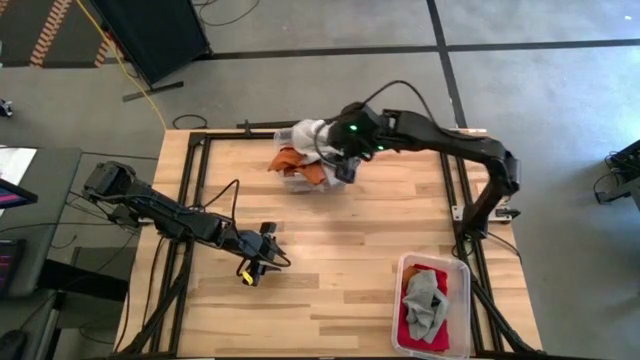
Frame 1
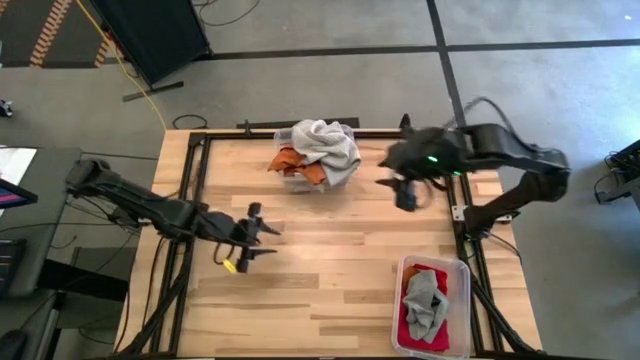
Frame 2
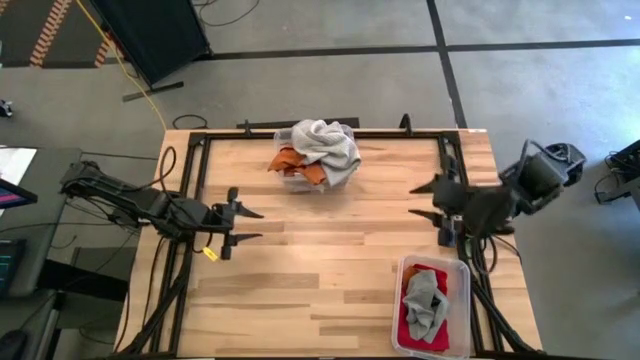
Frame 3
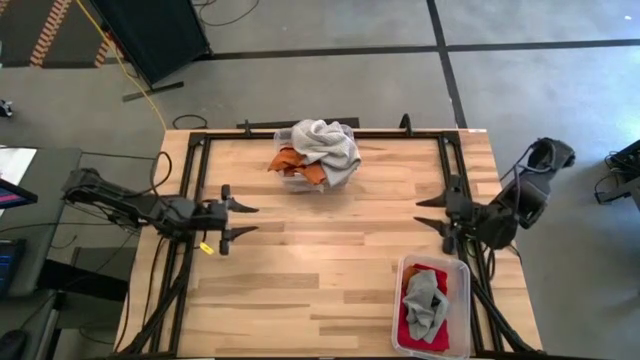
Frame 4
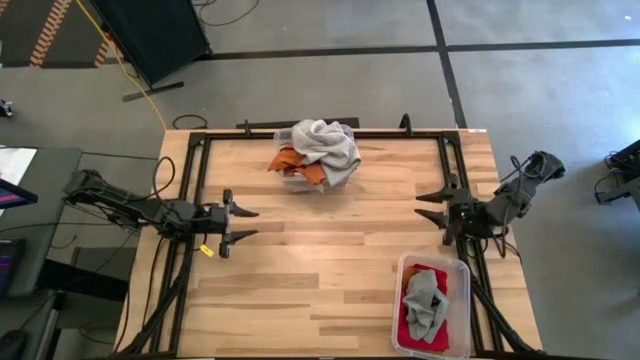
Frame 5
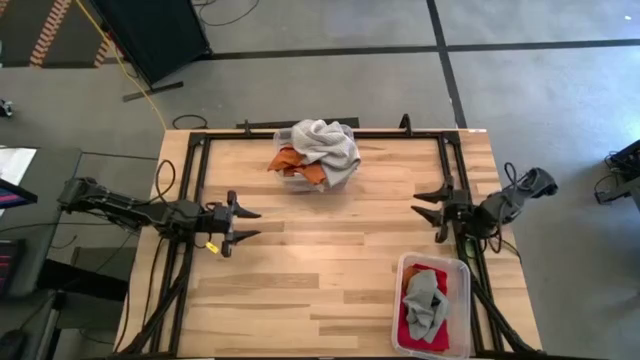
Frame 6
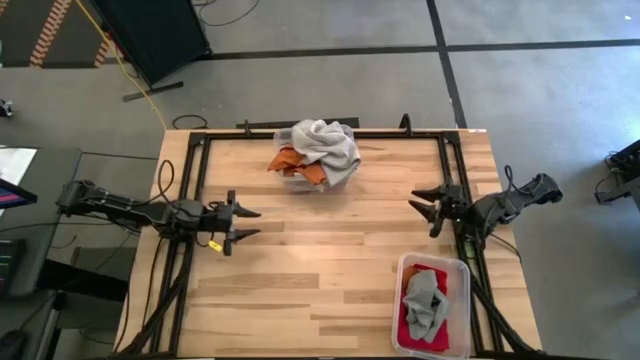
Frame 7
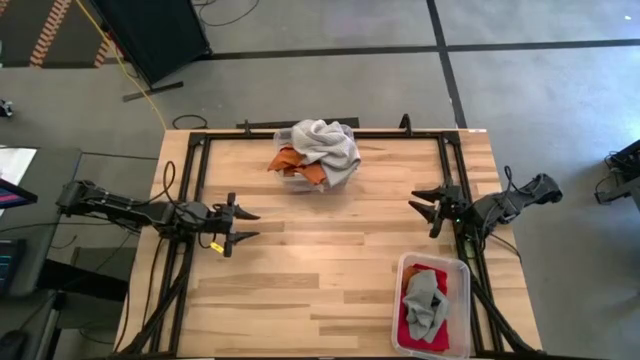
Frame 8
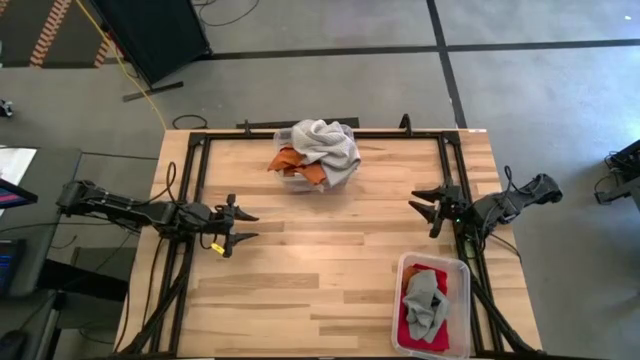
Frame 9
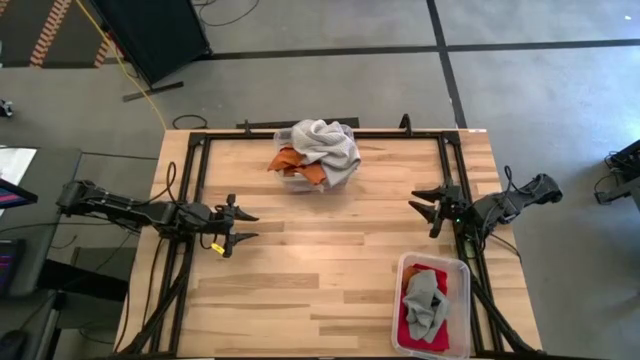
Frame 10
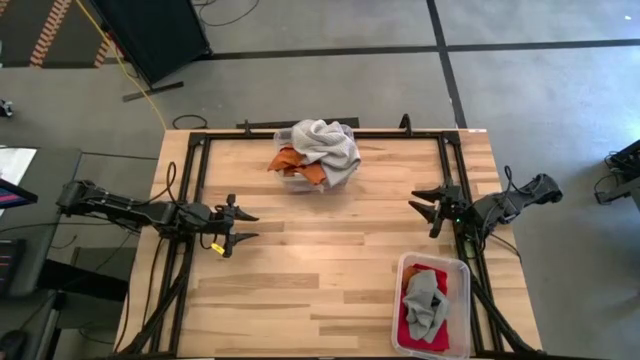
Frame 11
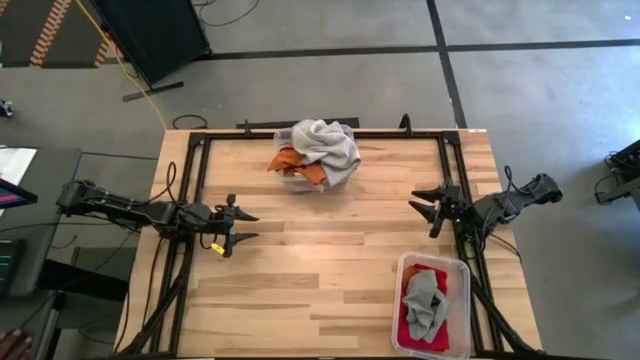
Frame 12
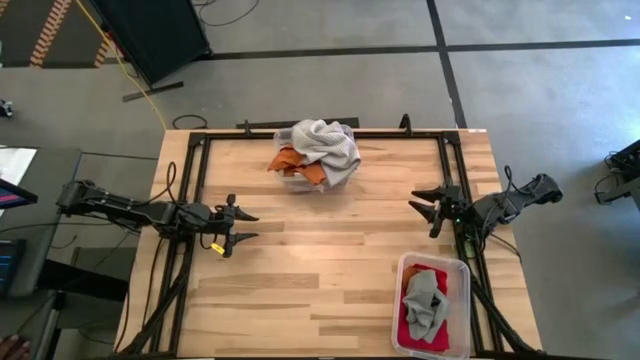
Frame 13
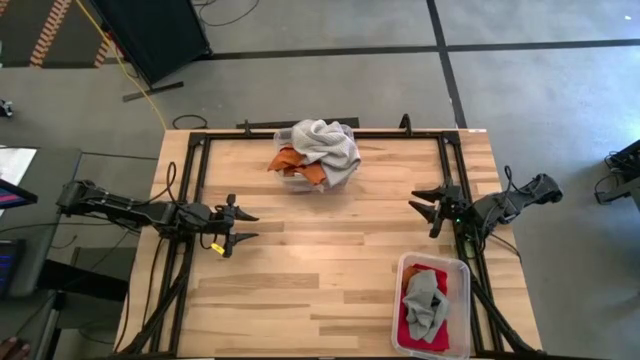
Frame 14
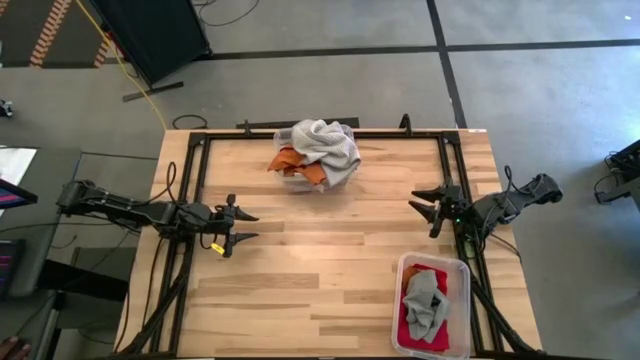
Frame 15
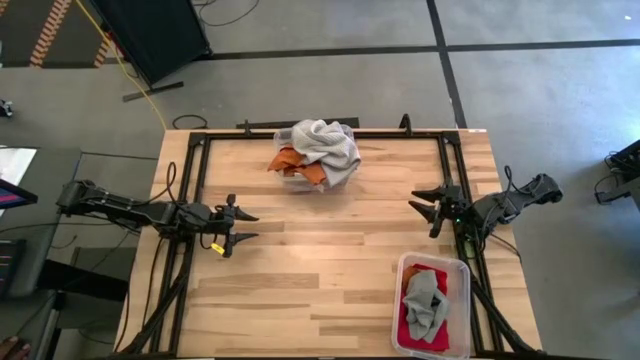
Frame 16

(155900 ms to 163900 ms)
Task: Sort towels by color in basket
Return to Home Position

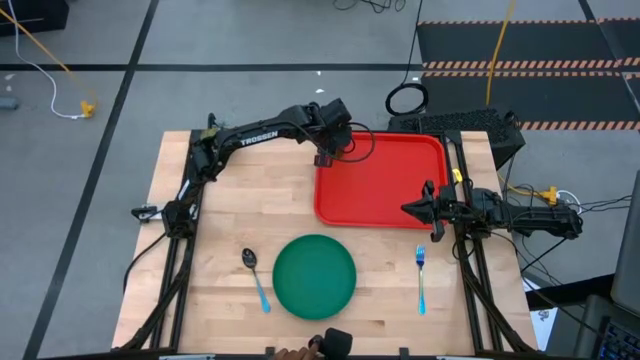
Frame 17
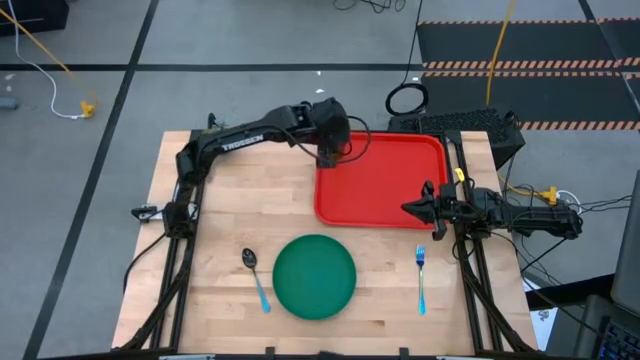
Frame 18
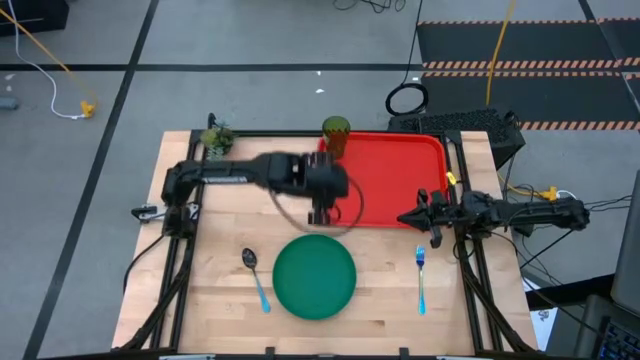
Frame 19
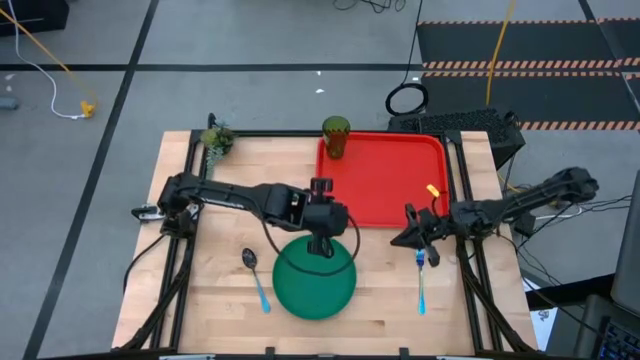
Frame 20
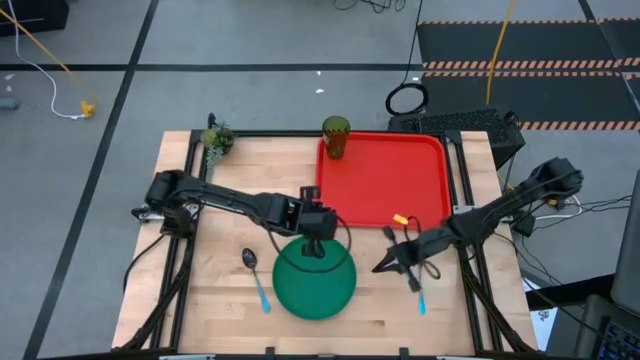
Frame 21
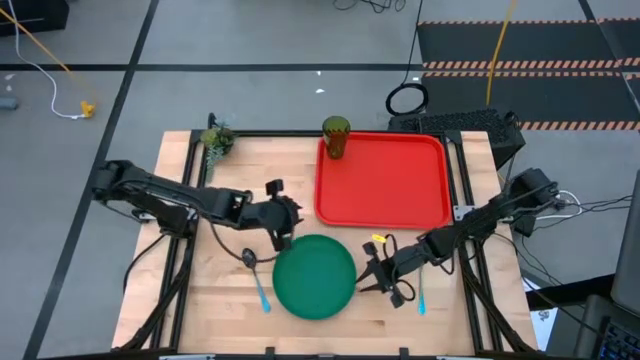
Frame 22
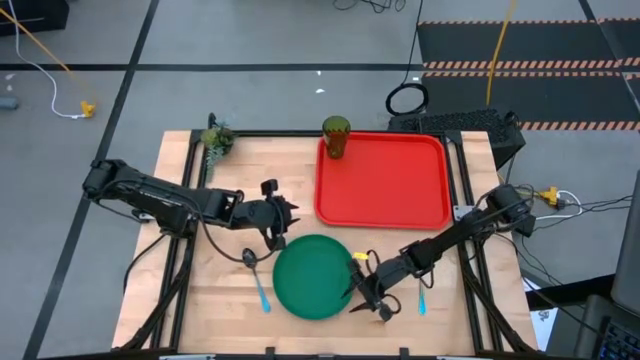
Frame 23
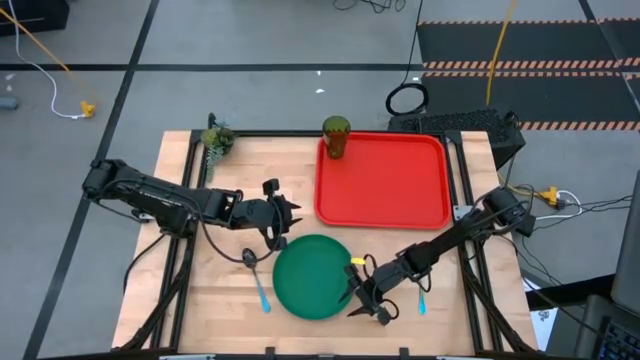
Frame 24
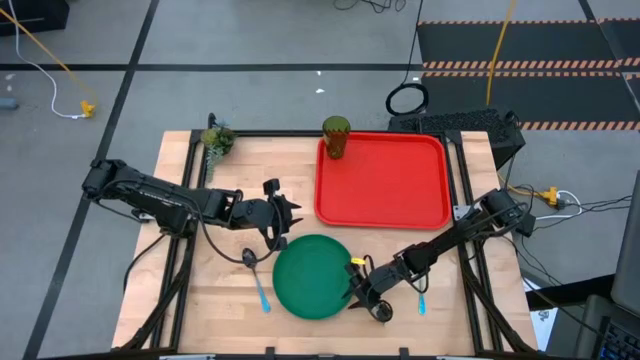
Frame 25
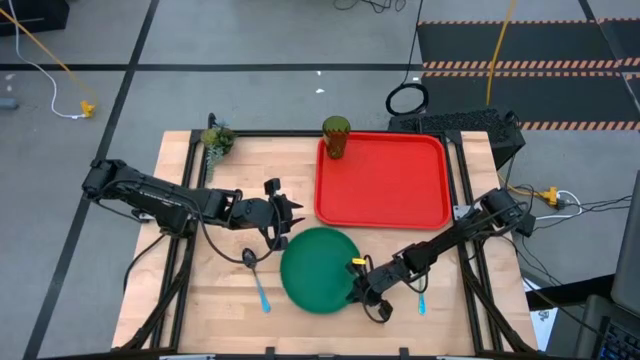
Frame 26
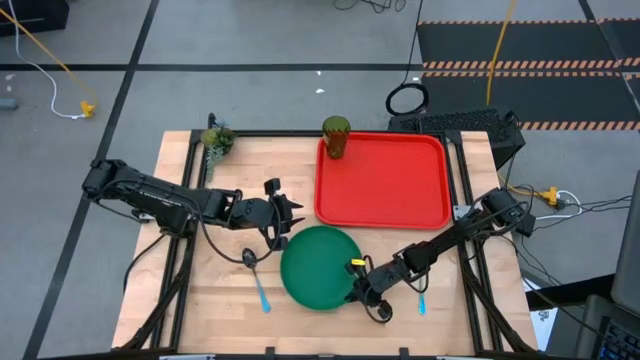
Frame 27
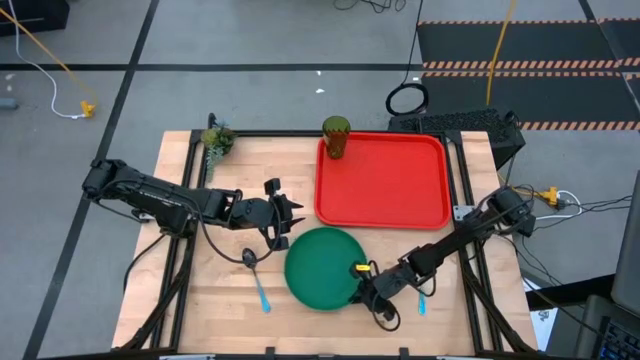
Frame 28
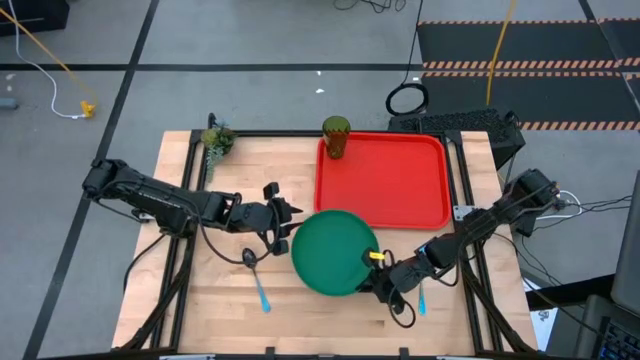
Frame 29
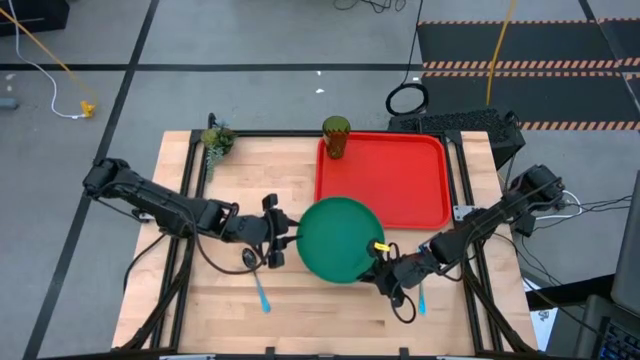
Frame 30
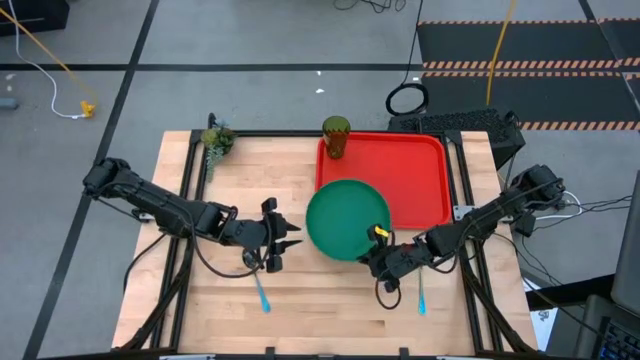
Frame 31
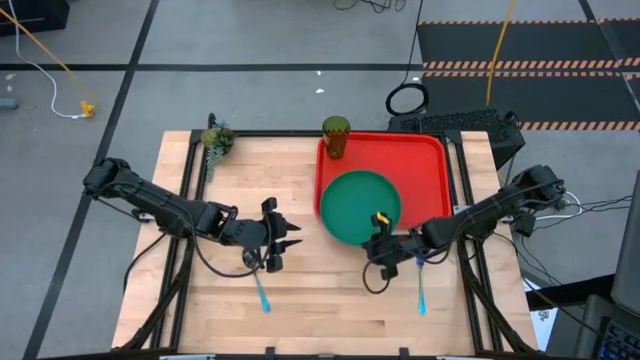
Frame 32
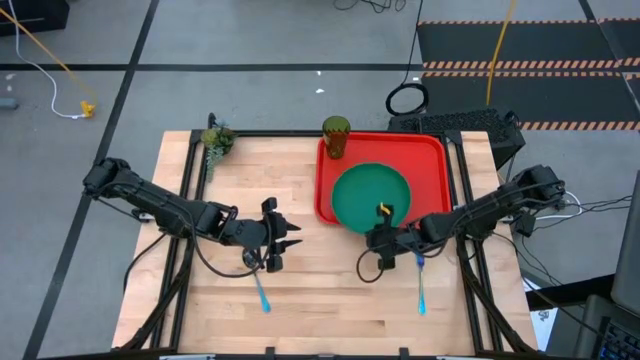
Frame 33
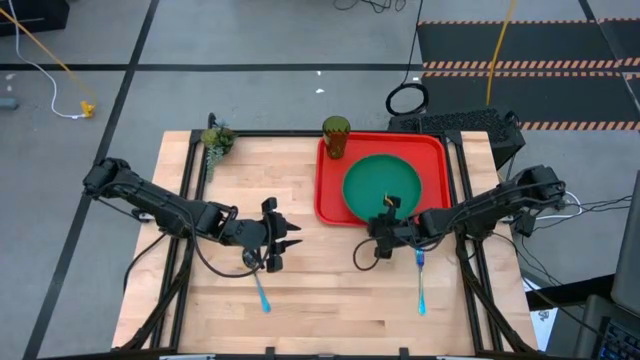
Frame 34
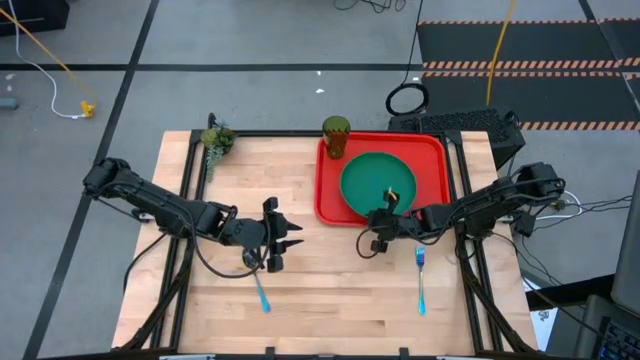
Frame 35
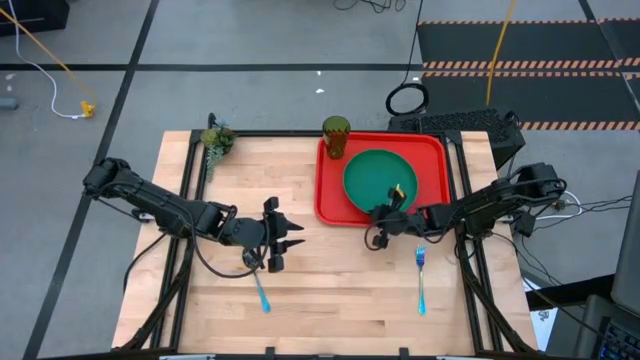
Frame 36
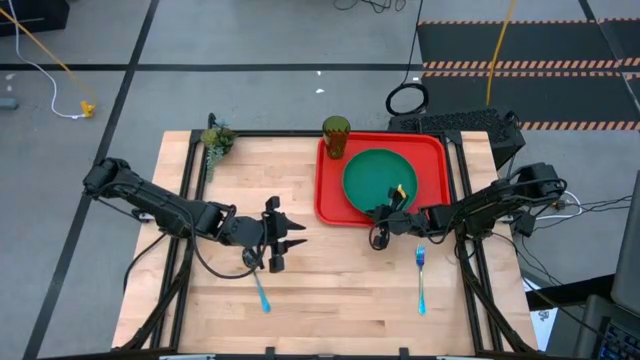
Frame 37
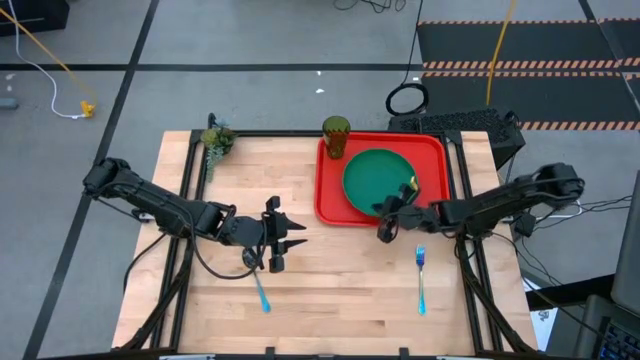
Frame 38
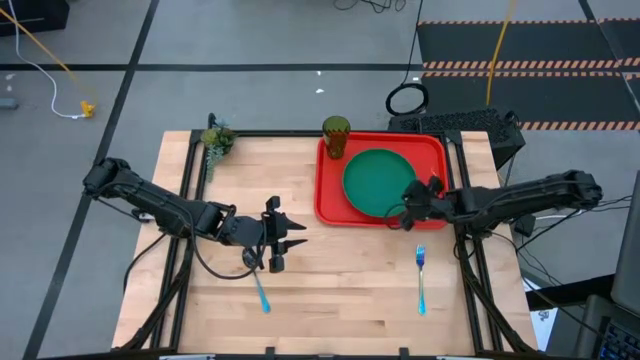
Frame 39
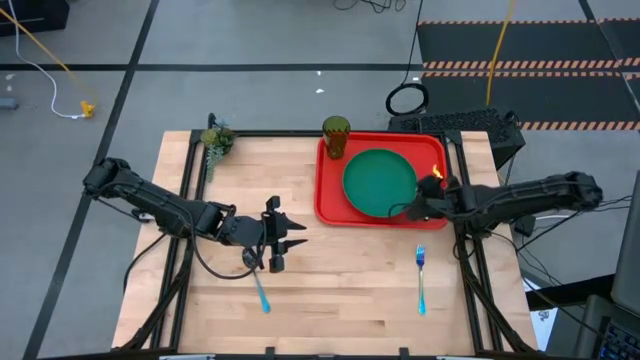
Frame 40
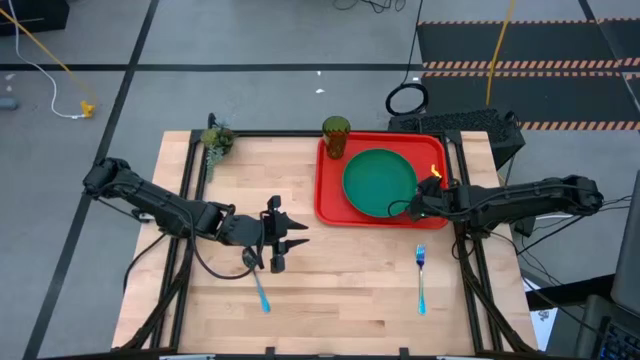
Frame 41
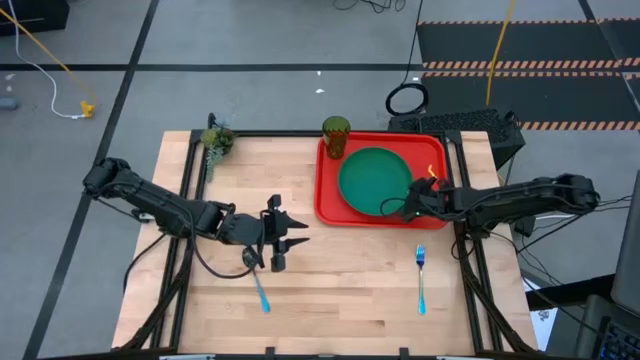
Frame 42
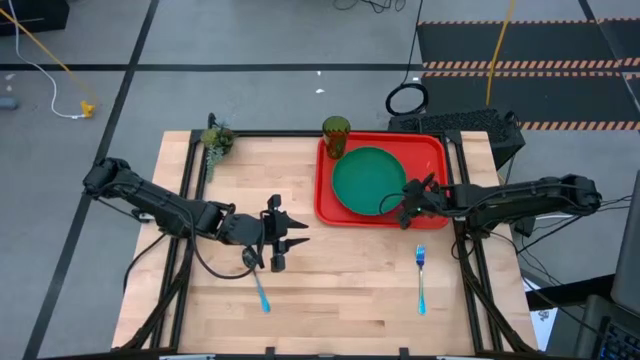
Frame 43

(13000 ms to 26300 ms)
Task: Pick and place plate/cup/fork/spoon on tray
Put the green plate on the red tray
